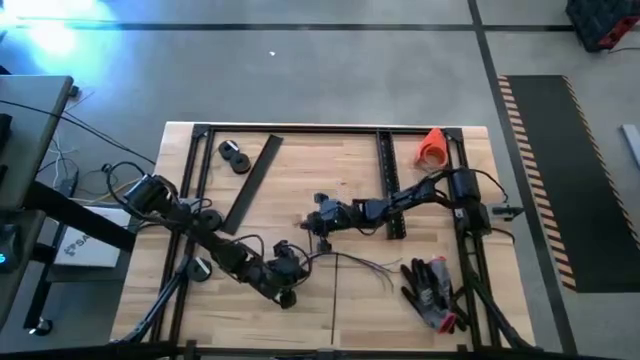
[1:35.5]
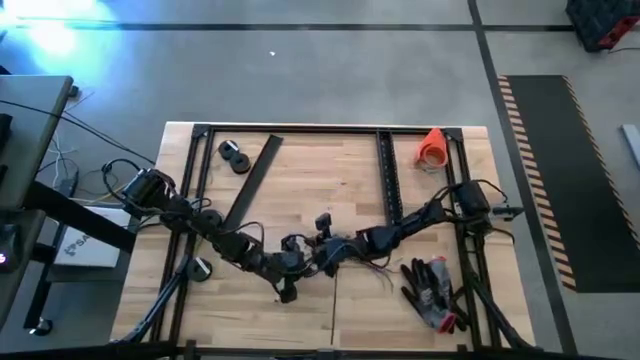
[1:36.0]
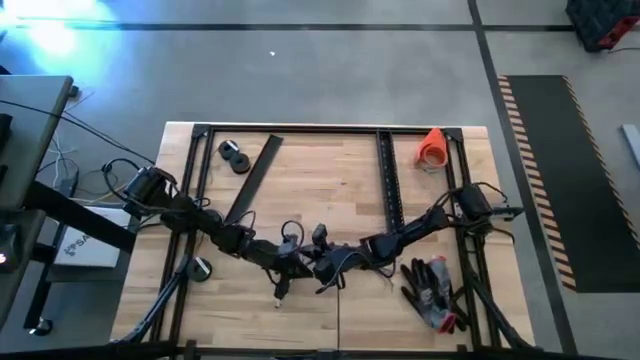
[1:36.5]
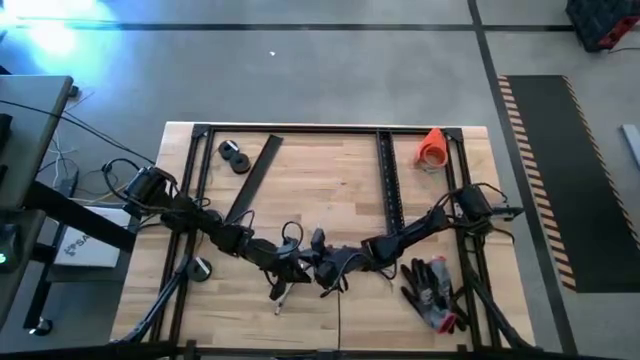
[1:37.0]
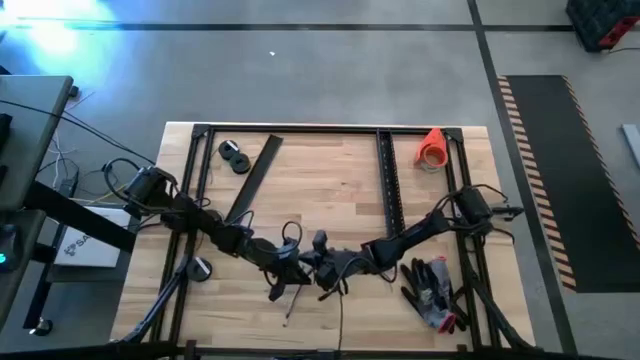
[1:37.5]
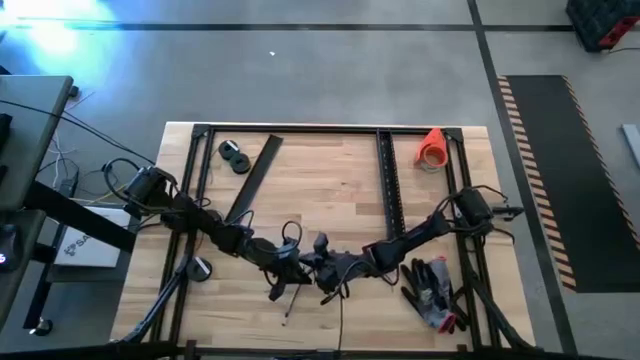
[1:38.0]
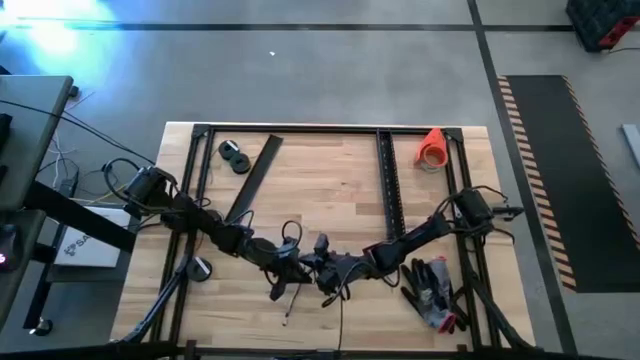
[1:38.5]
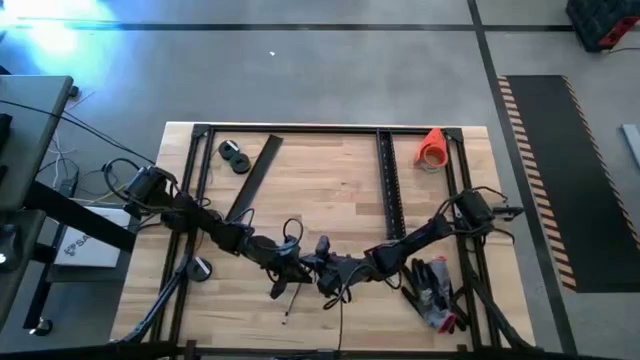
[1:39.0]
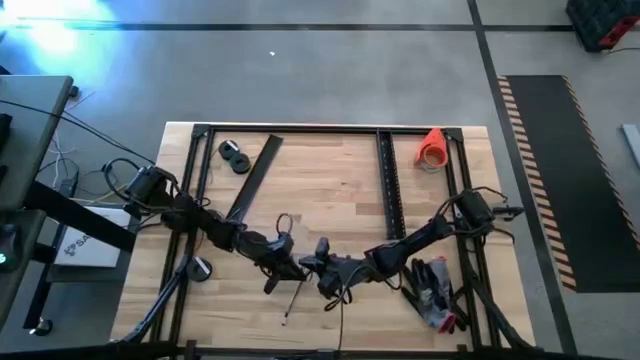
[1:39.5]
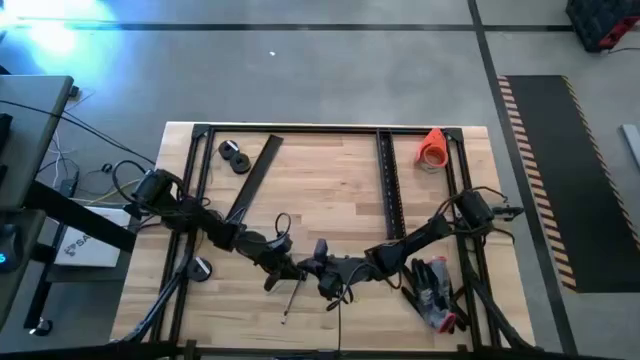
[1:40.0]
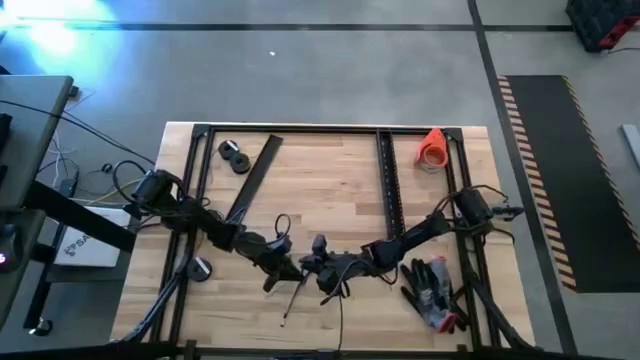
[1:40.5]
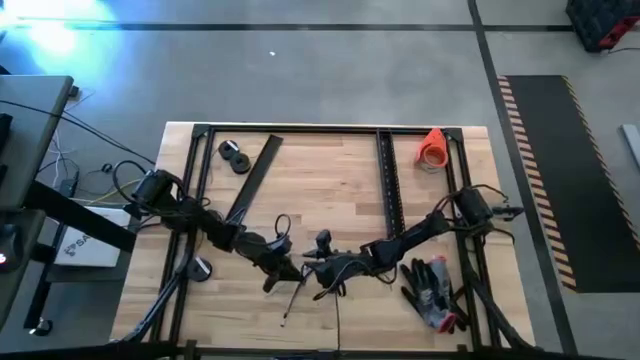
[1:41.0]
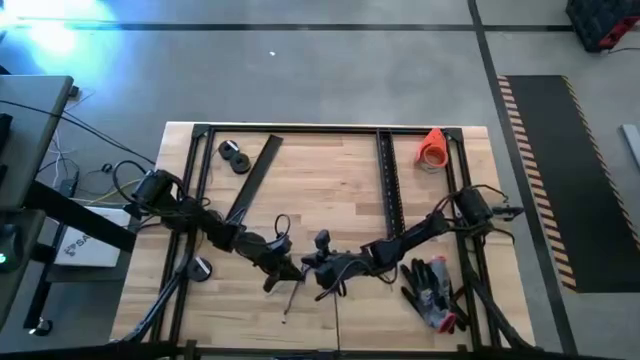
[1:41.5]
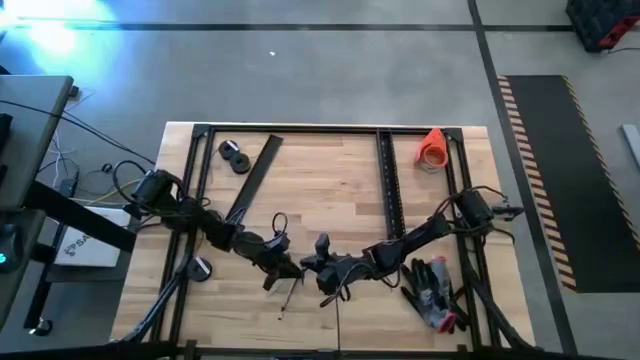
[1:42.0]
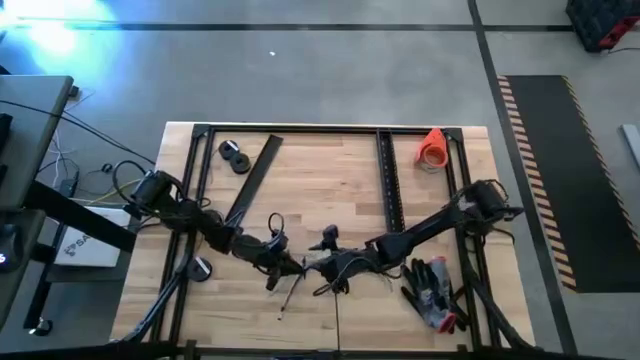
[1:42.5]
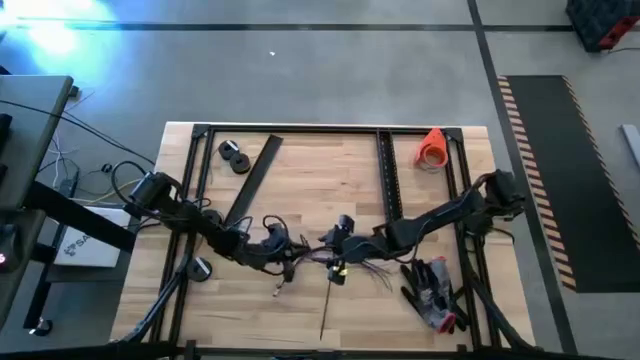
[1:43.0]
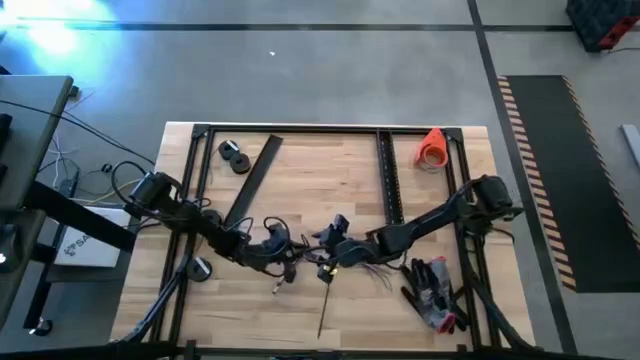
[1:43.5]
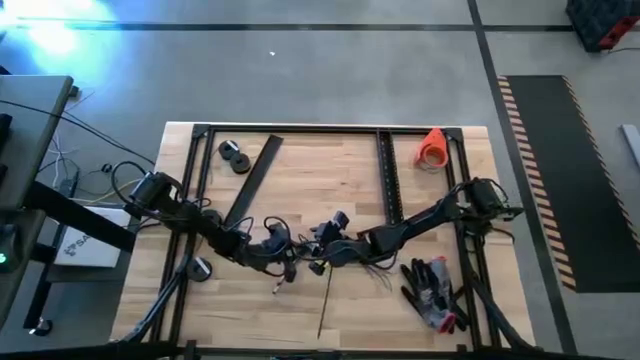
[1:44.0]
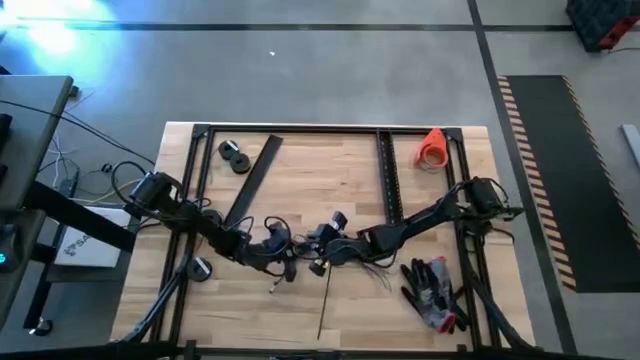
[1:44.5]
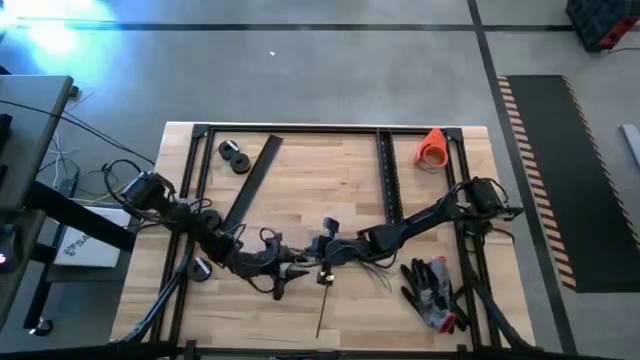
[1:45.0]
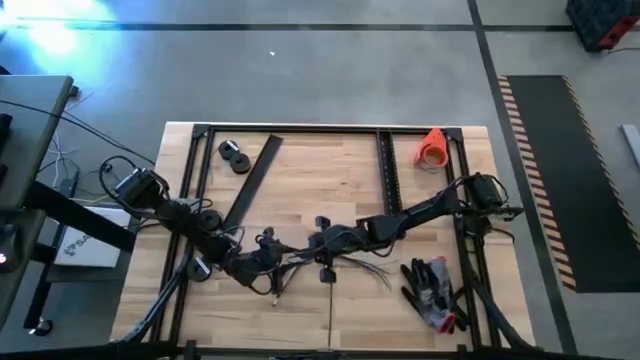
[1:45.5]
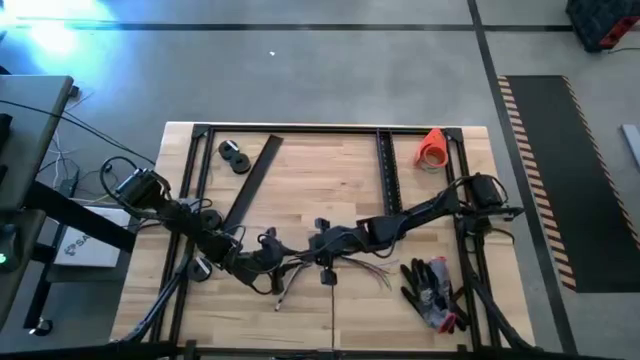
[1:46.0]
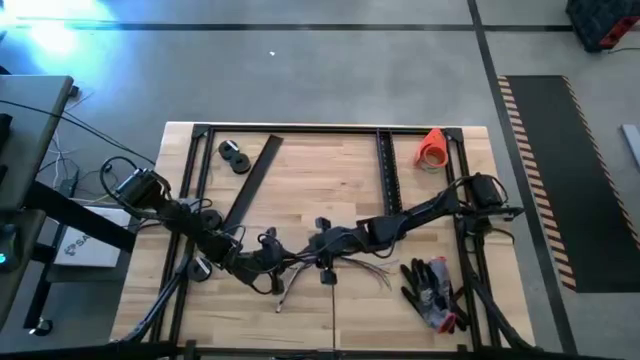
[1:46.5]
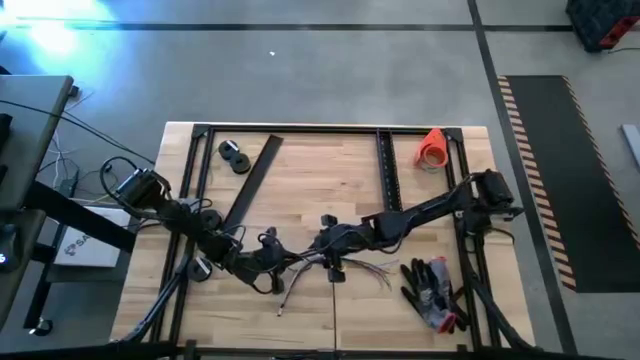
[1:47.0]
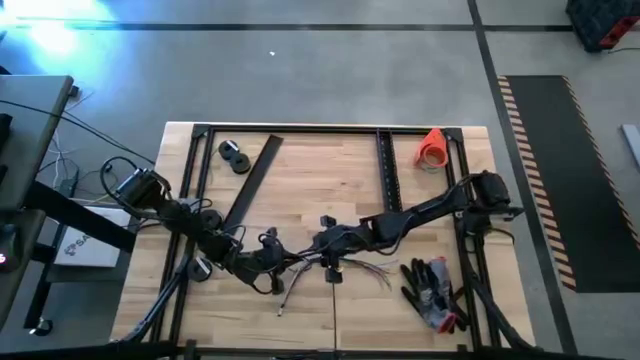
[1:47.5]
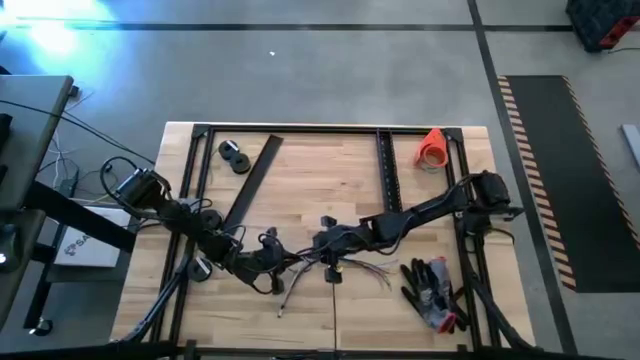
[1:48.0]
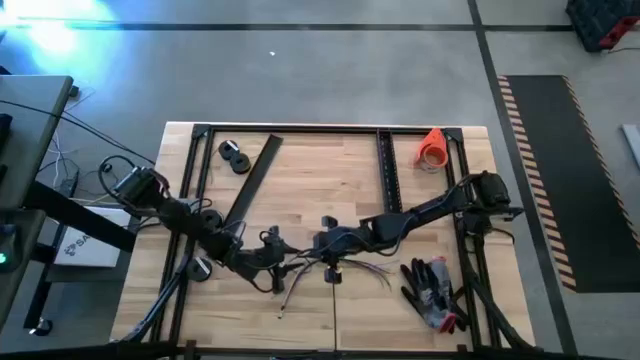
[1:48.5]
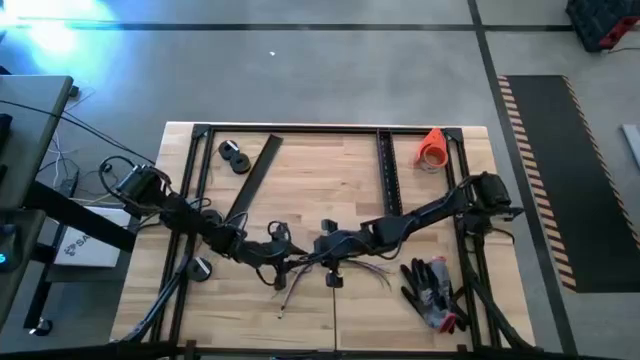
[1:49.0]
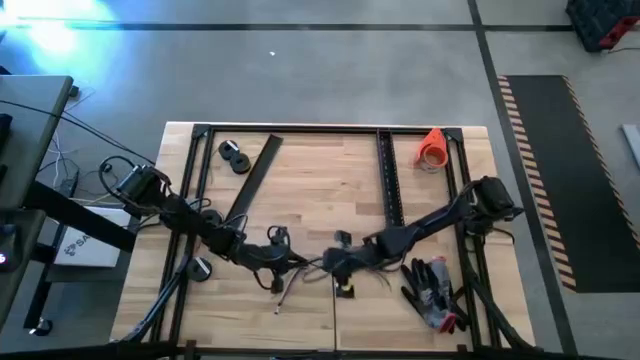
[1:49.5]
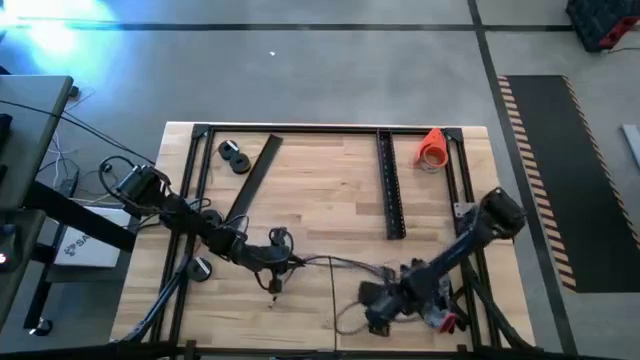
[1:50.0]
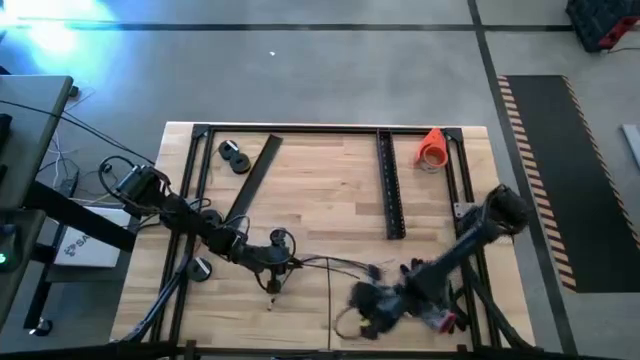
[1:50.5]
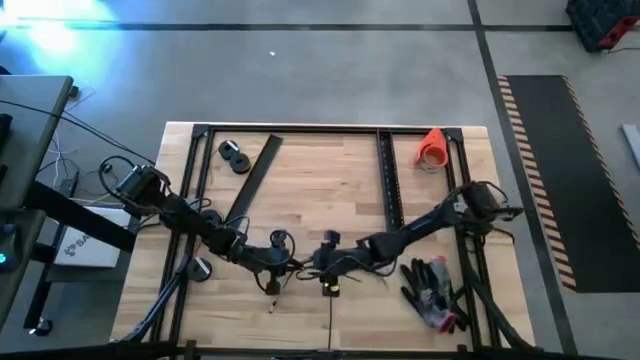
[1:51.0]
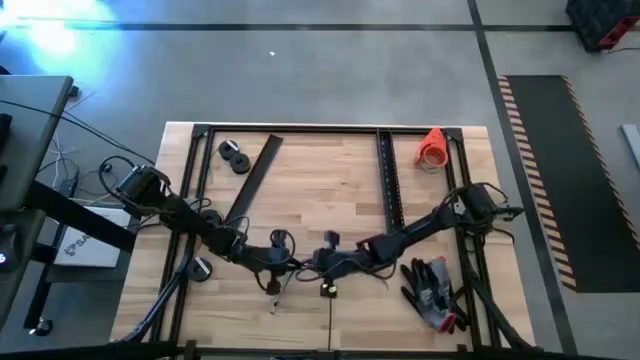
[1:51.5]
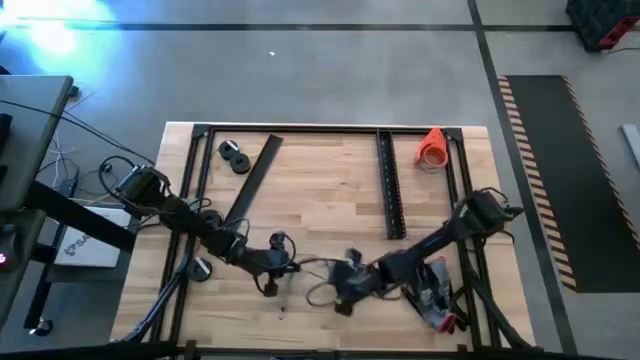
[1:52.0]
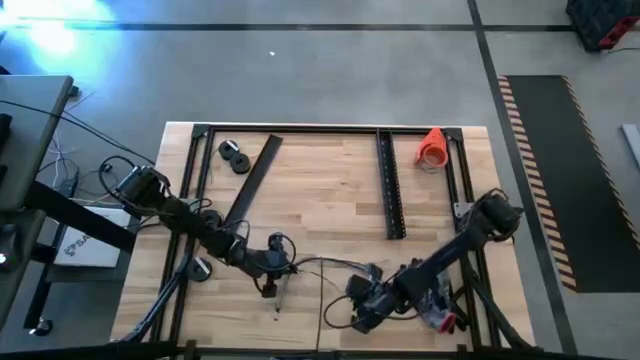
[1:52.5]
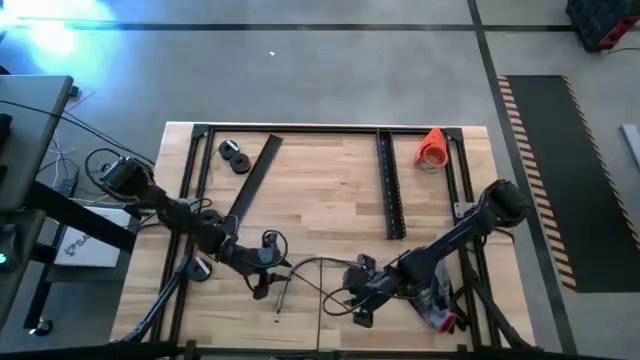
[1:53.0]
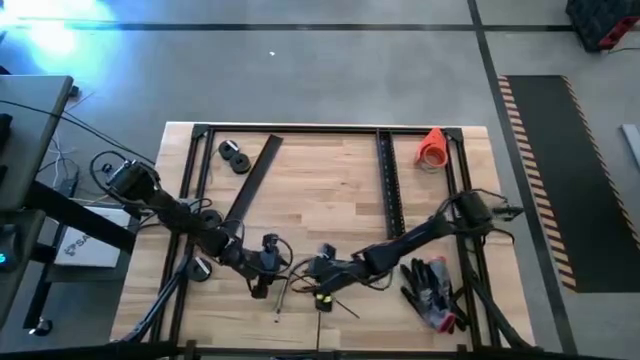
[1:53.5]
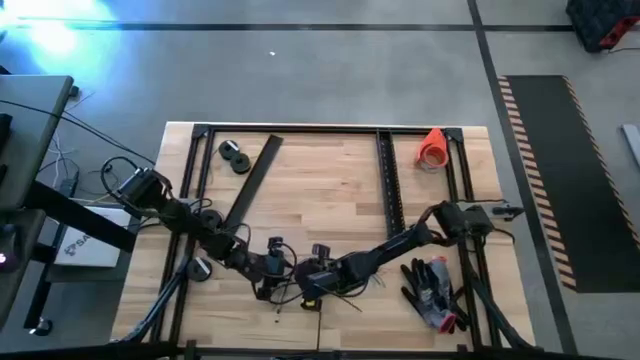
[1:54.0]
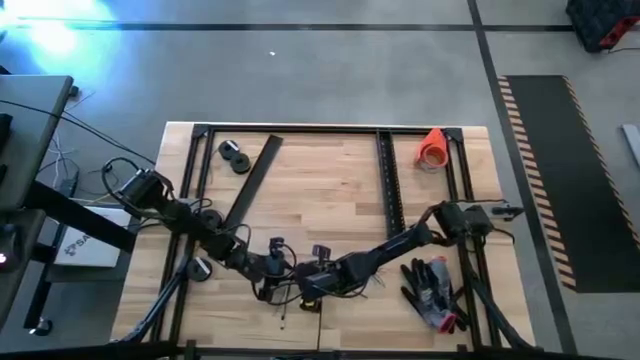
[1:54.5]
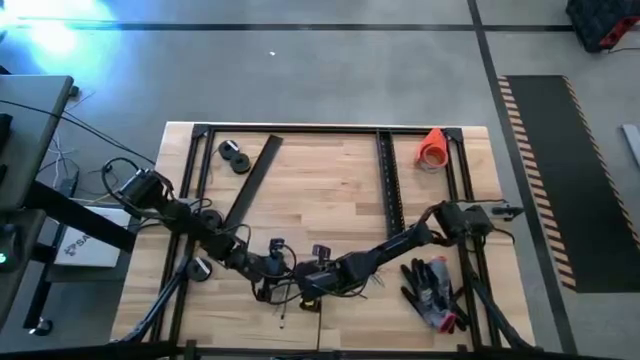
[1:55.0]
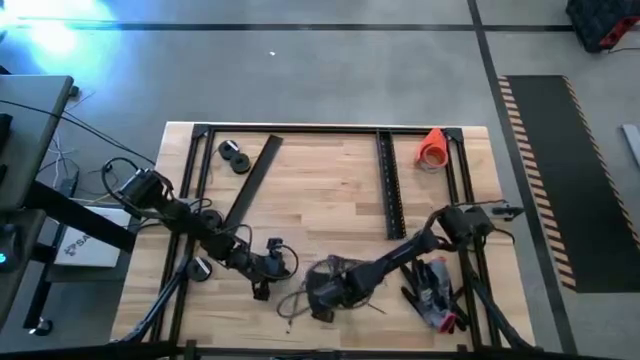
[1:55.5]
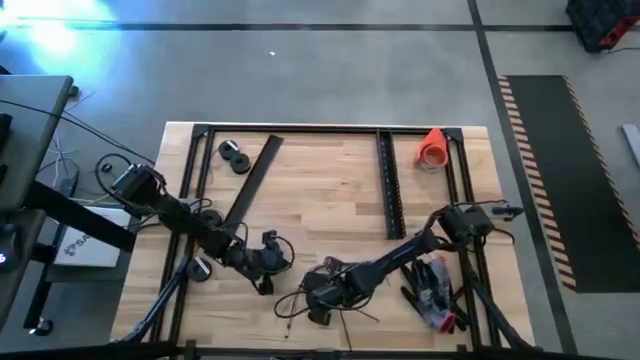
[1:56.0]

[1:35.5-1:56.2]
Task: Ziptie cables
Wrap the black zip tie on the cables

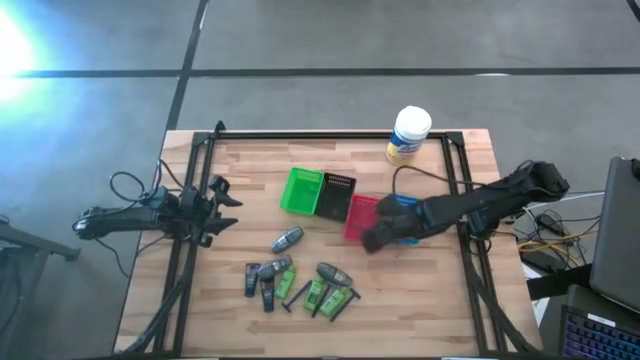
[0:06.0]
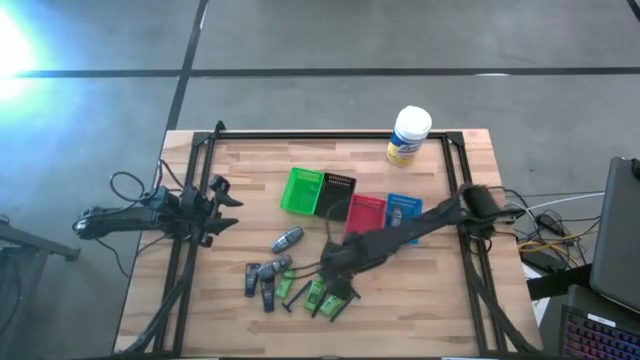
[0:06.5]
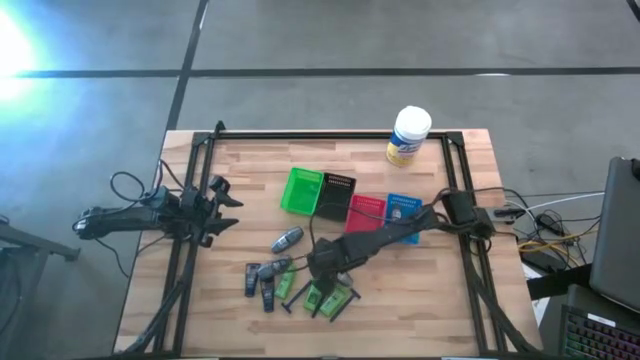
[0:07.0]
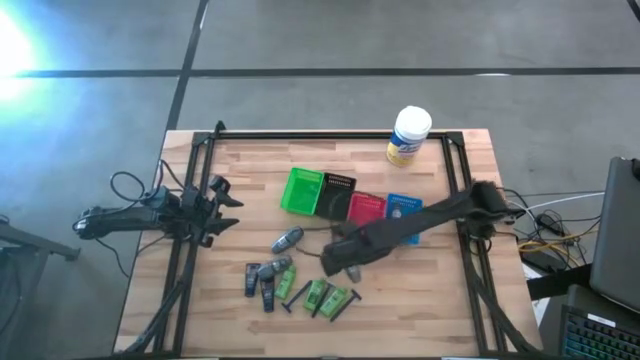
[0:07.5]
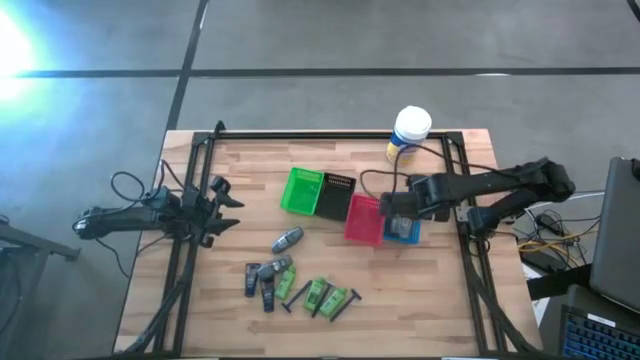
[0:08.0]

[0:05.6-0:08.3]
Task: Pick & Place Travel size toiletries
Put the deodorant into the blue bin
